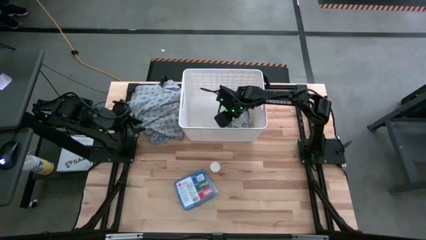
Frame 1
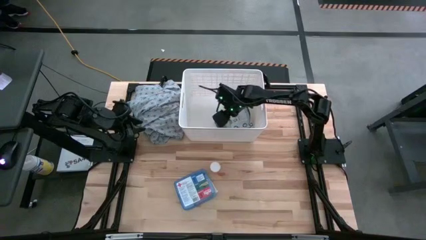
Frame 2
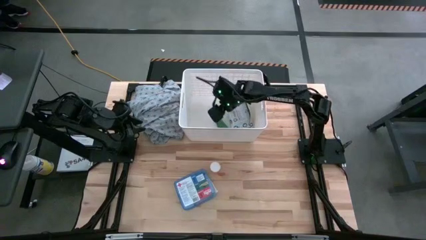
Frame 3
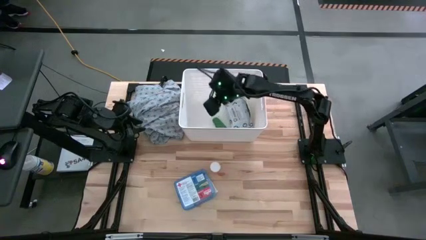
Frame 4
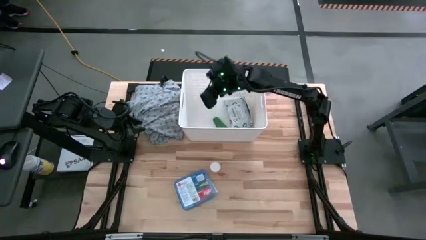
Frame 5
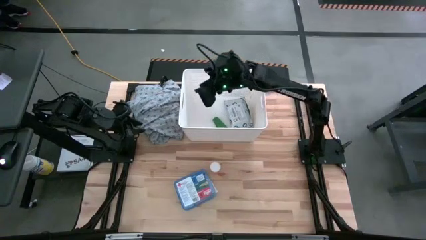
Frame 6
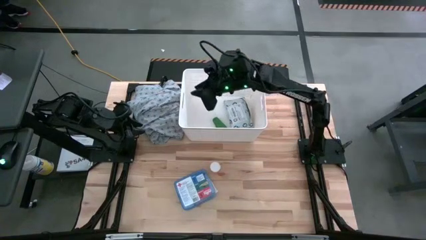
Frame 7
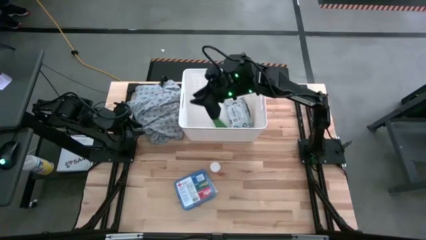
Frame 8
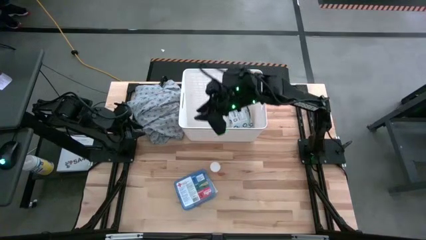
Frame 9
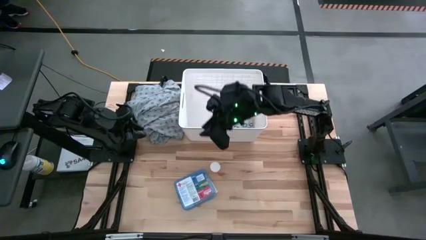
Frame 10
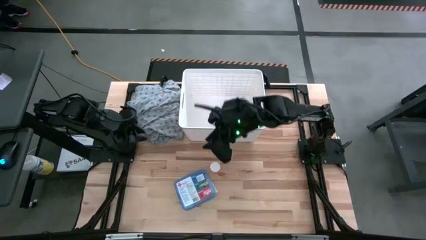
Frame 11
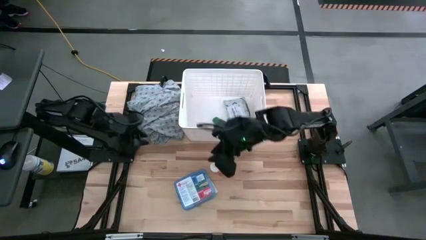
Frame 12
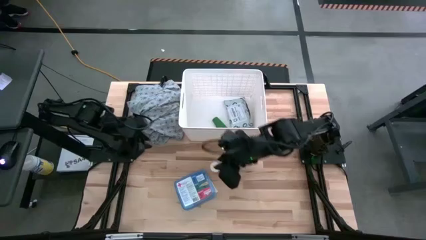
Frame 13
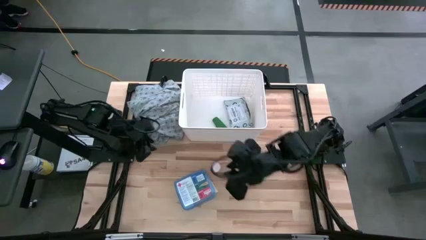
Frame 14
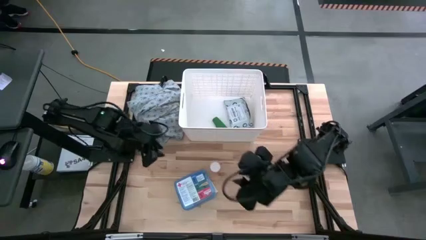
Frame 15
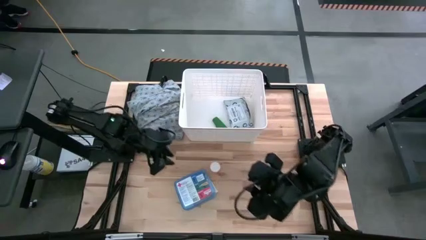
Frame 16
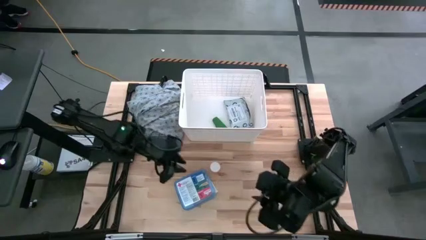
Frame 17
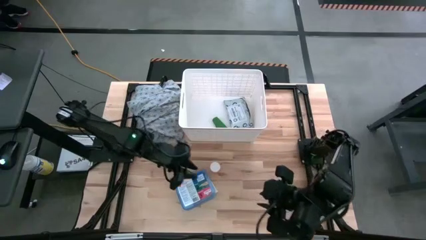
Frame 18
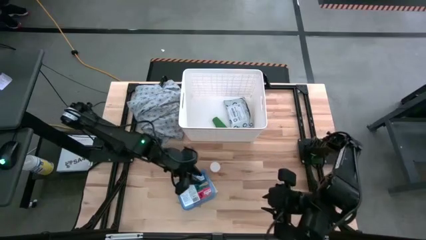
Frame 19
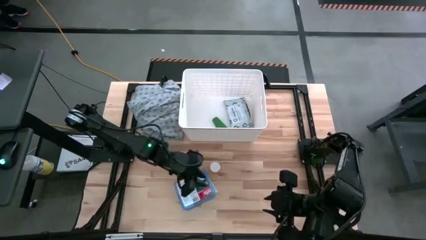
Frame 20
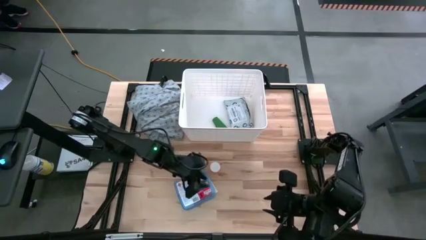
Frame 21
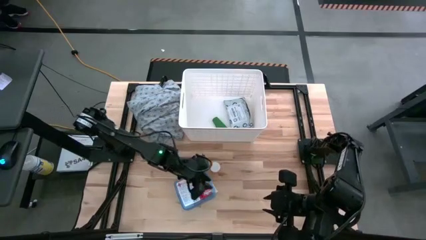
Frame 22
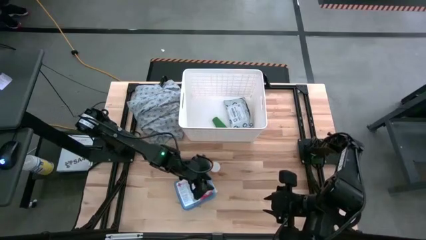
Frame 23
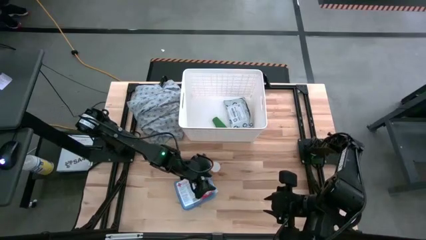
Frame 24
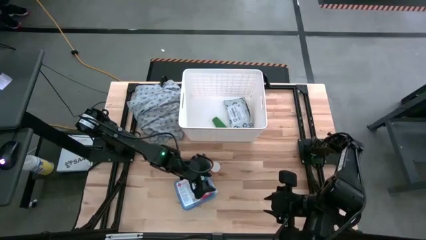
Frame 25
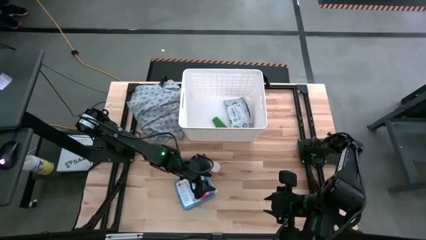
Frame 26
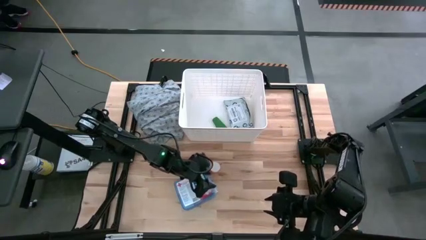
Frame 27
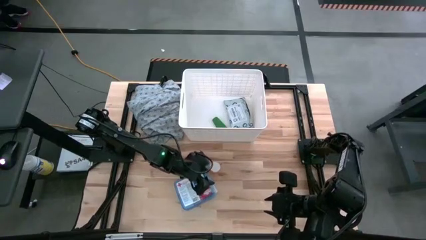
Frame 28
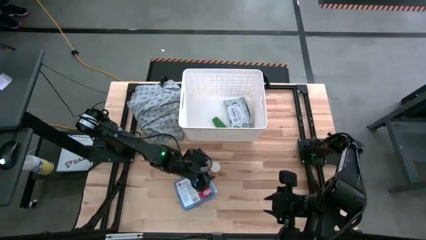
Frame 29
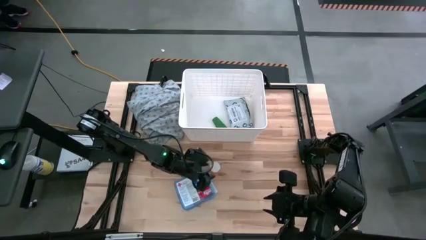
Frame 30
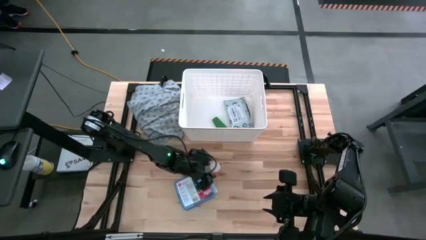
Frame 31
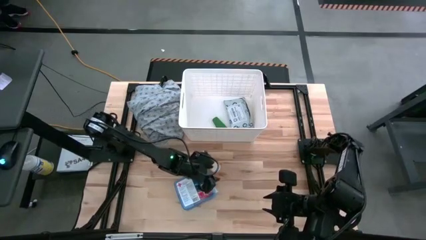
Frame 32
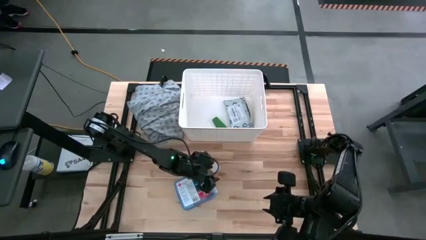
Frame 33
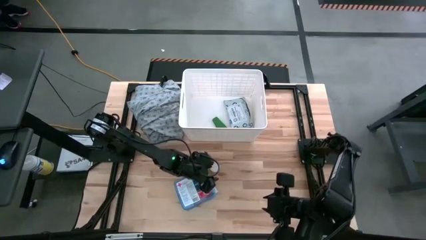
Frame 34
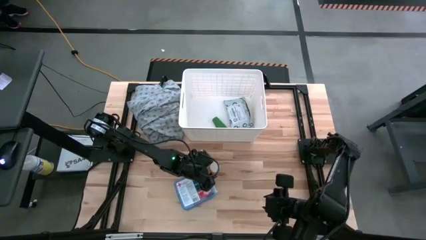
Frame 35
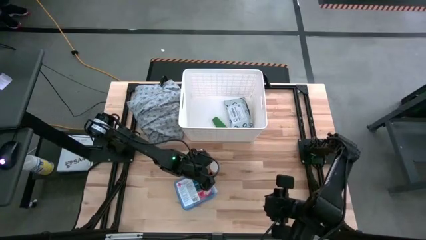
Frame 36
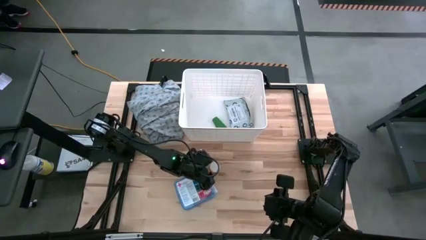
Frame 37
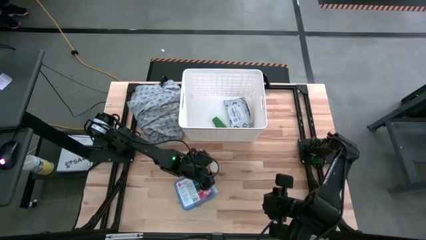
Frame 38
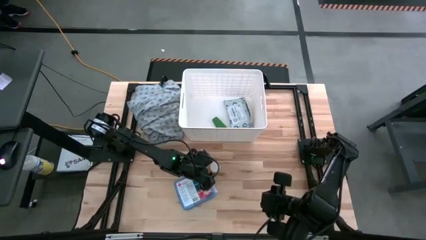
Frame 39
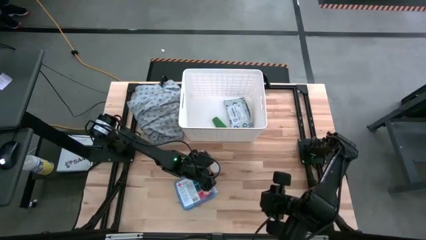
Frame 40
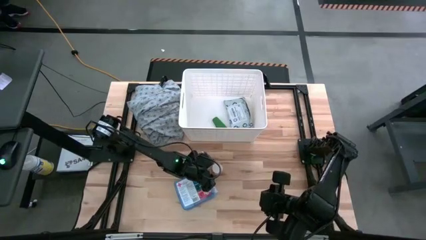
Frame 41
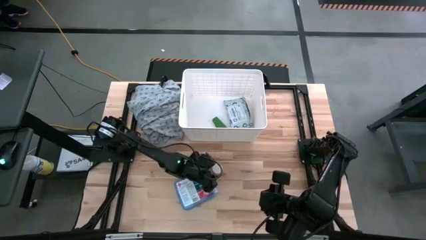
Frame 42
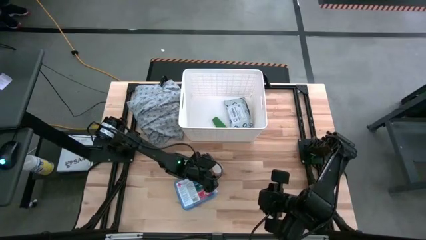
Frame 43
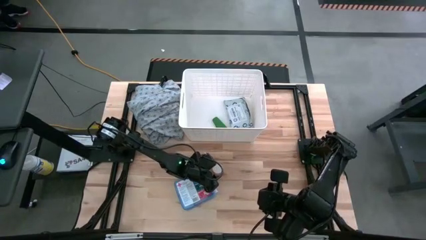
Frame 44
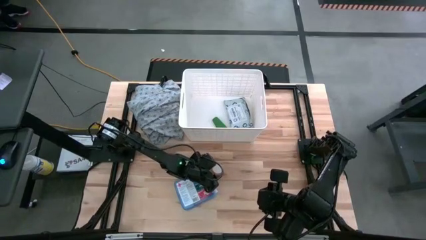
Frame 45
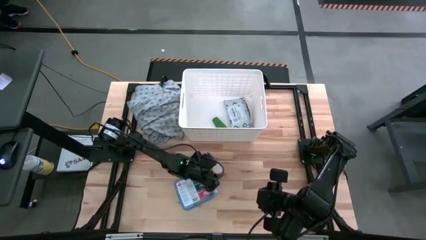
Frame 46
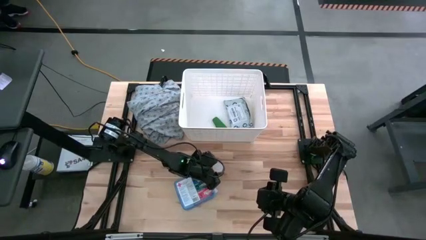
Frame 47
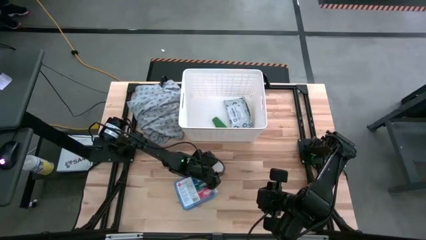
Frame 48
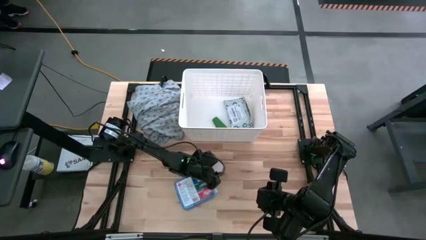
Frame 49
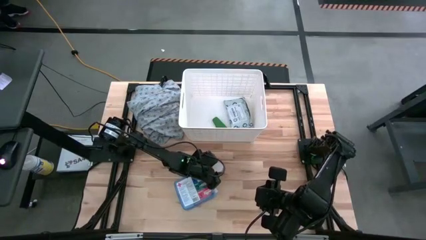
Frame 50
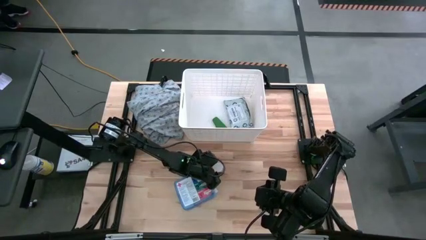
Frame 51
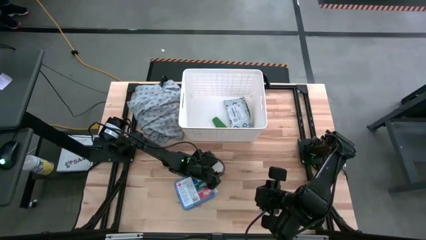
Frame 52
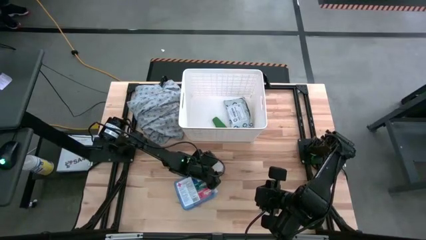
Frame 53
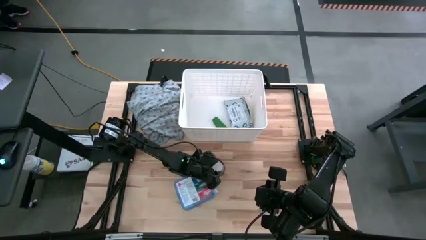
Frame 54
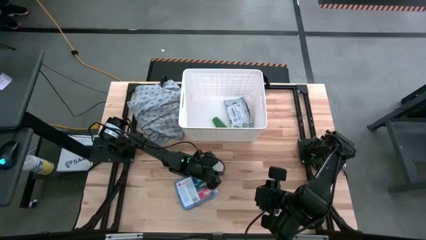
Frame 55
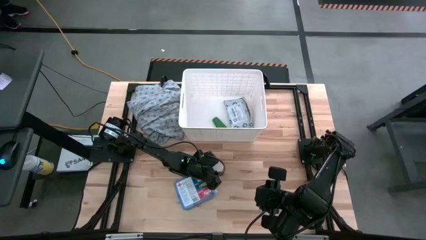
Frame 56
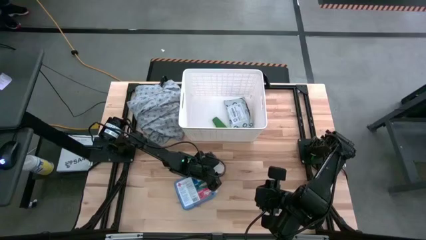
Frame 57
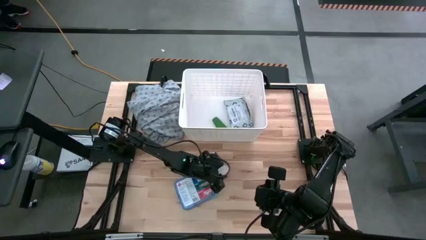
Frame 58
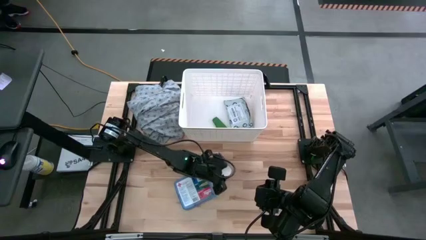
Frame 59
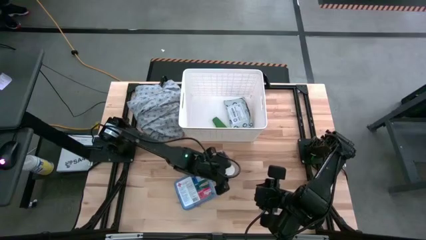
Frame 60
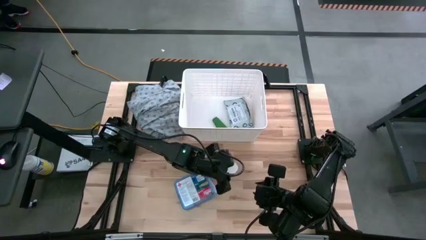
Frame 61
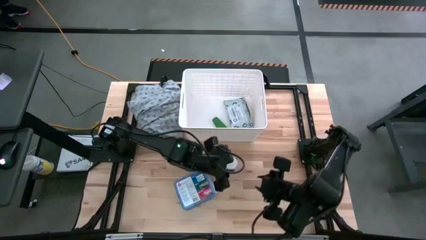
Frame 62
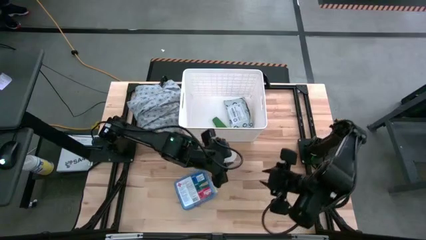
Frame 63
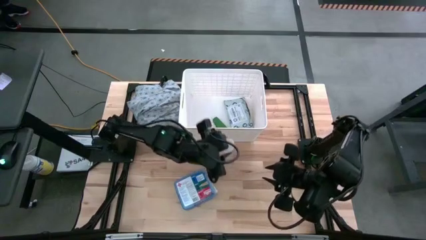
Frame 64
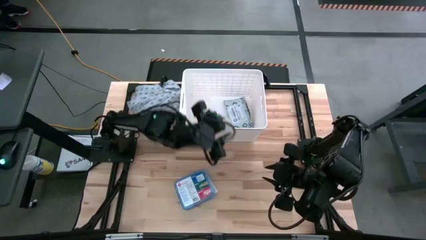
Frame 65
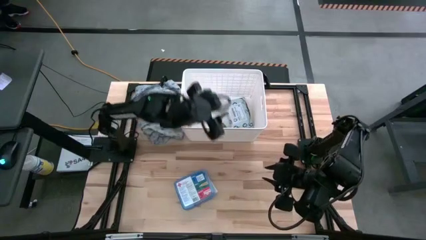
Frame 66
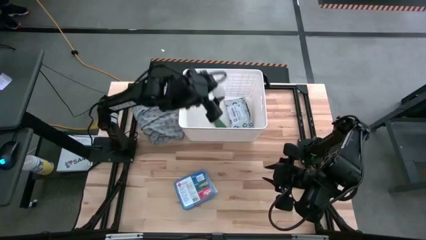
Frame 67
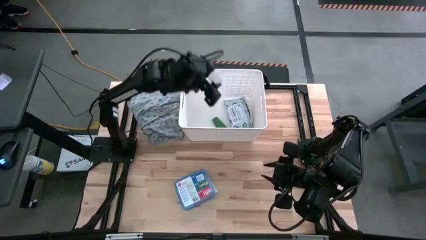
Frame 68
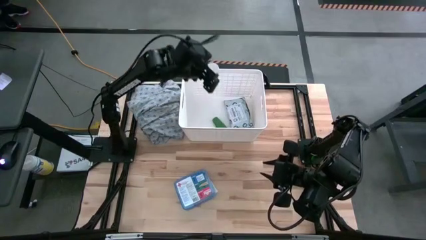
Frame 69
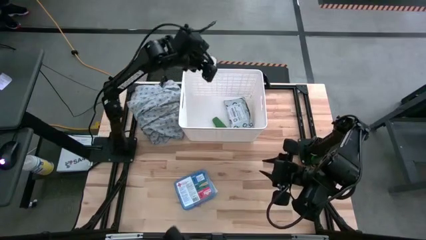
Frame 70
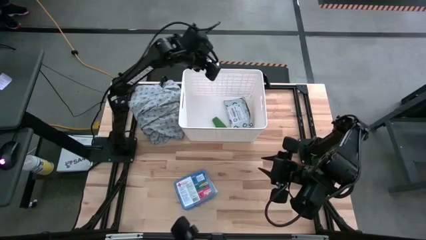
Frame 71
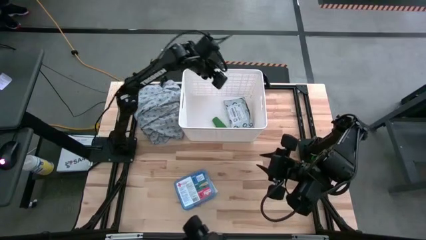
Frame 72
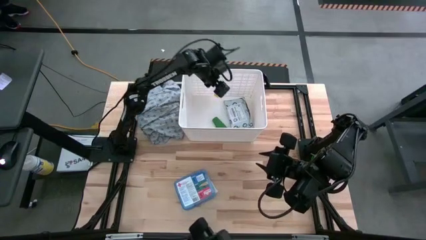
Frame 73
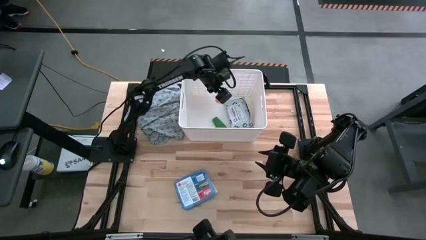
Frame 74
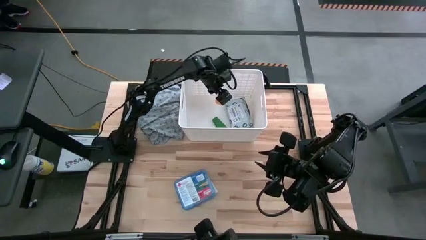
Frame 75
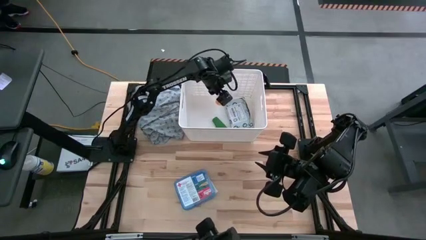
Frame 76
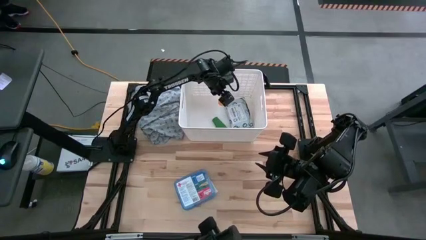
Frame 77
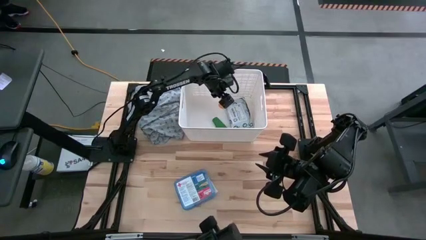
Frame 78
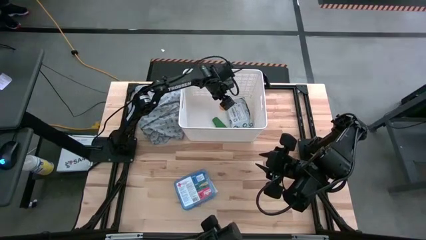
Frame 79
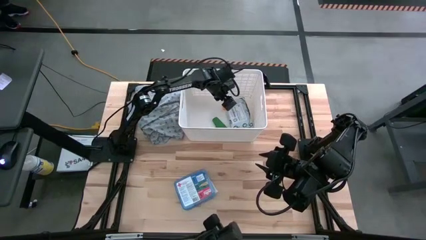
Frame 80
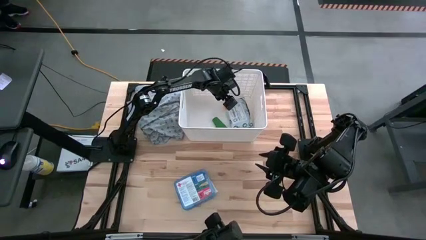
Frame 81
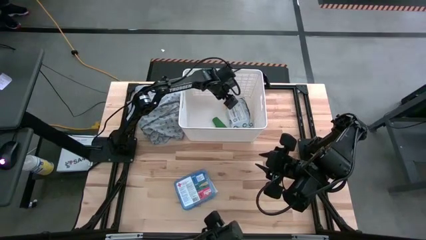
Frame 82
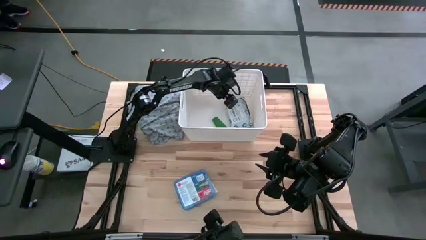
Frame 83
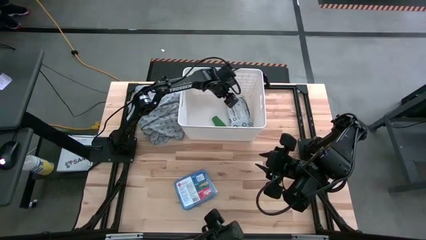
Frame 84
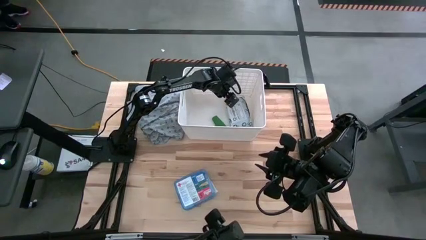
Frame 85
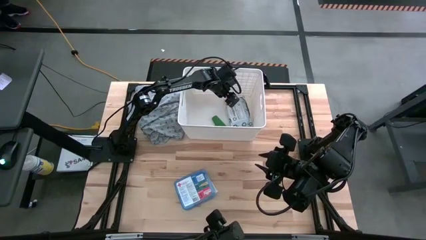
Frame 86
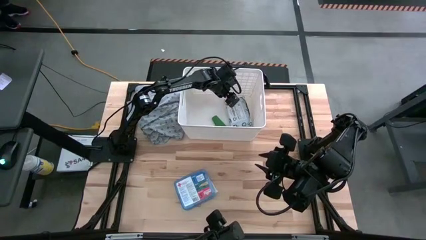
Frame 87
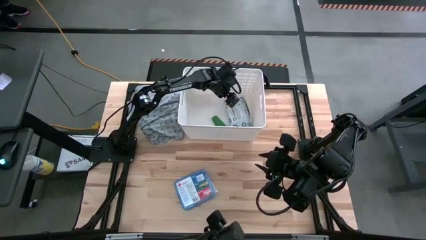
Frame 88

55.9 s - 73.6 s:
Task: Pick & place medical supplies in basket/bin
Put the orange pill bottle into the white bin
